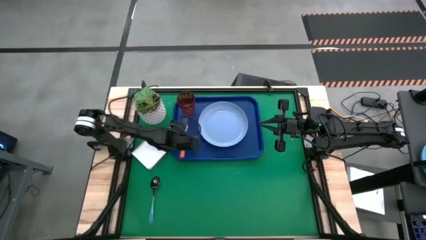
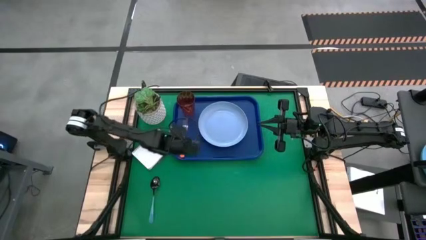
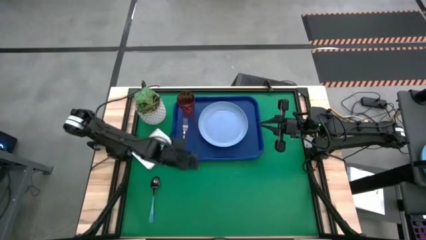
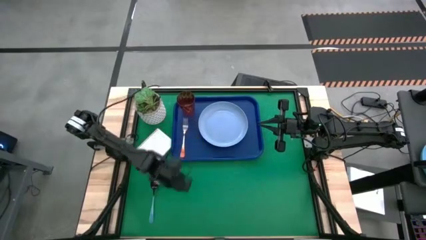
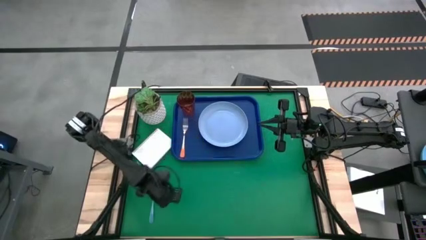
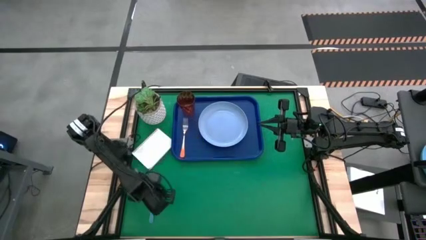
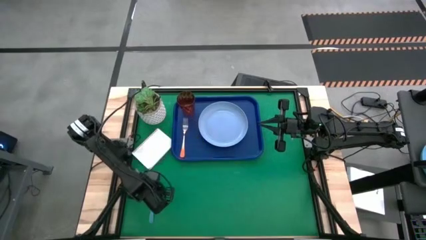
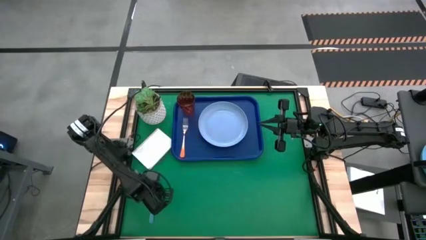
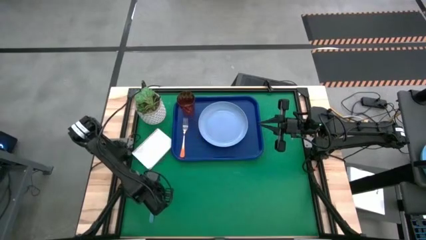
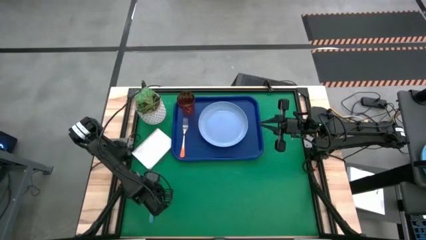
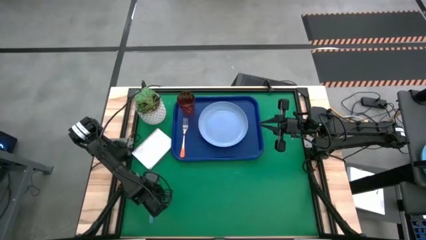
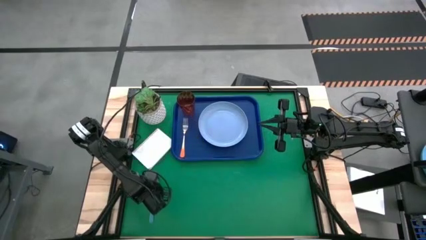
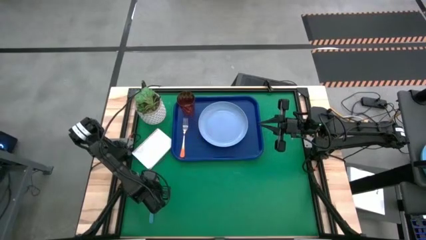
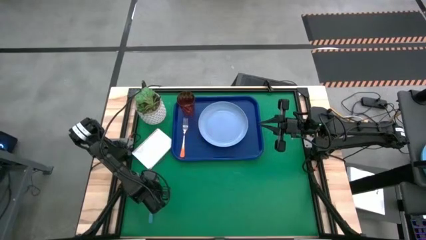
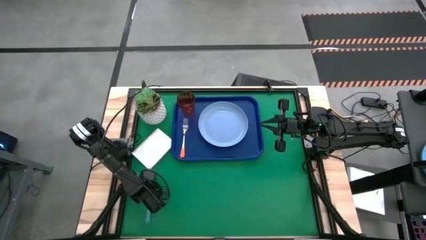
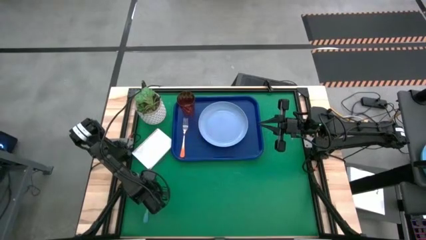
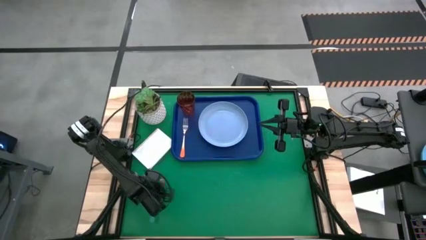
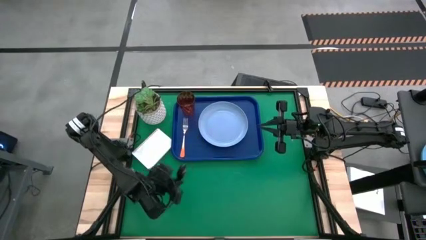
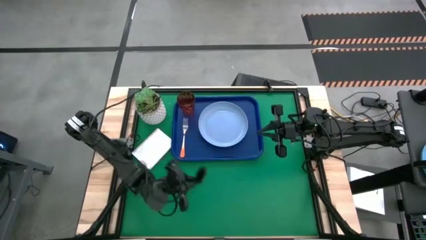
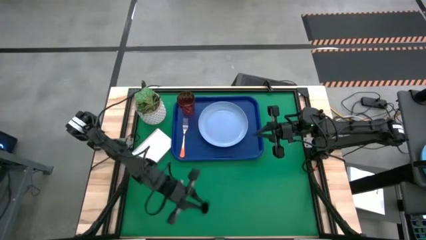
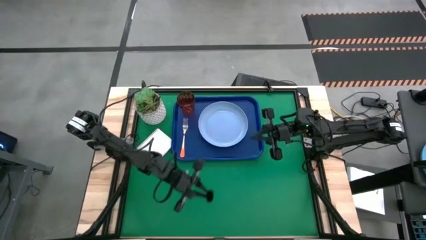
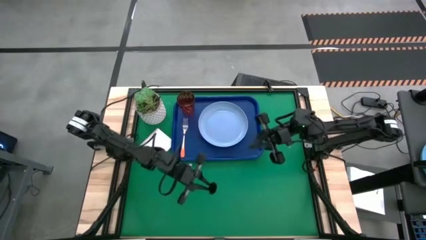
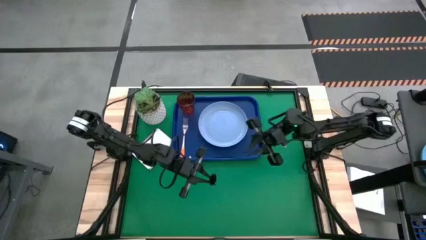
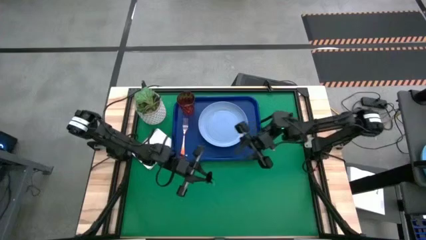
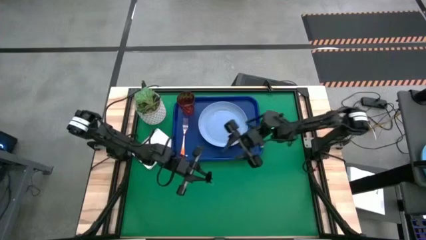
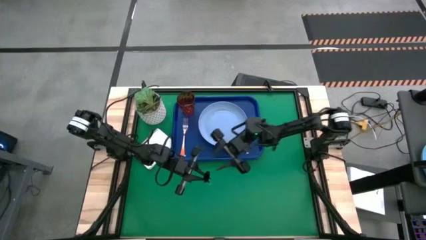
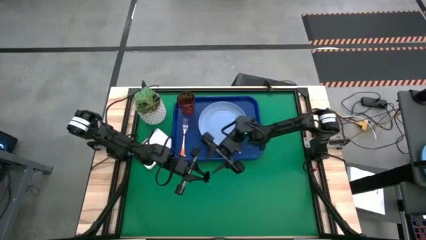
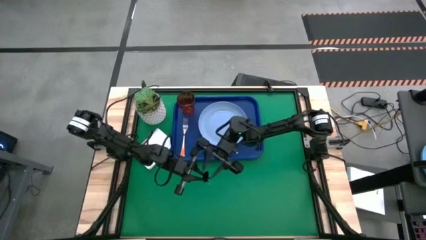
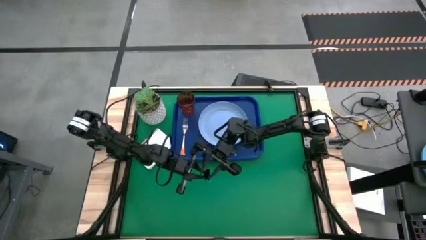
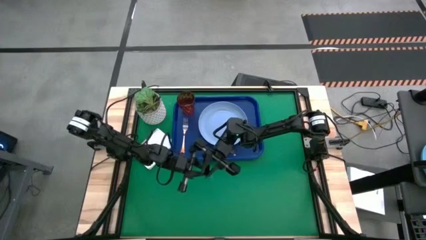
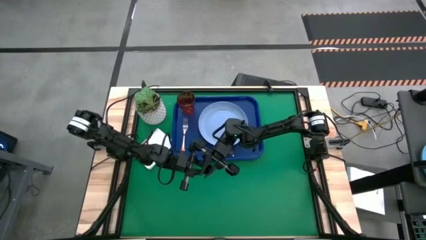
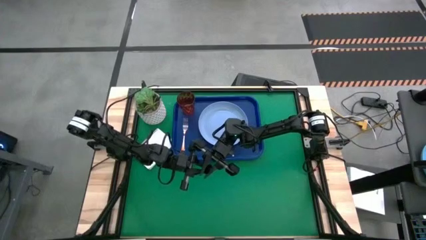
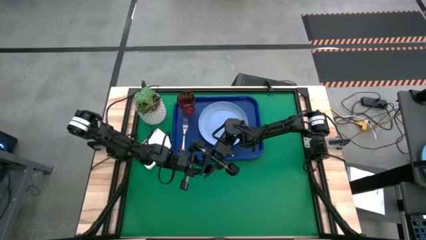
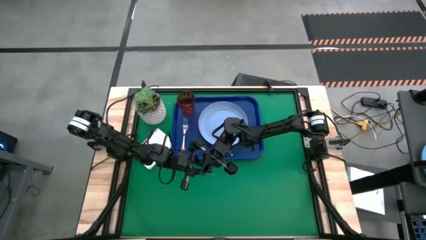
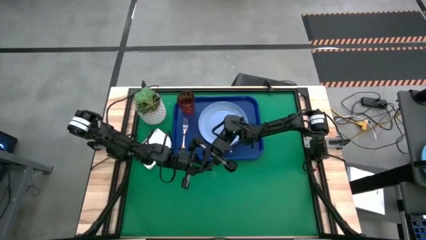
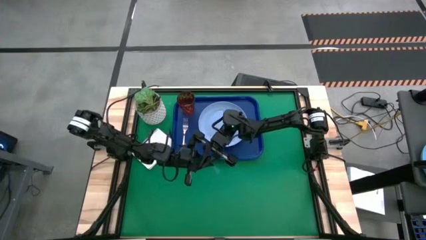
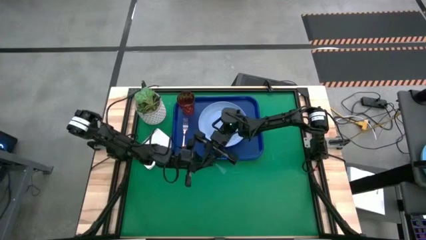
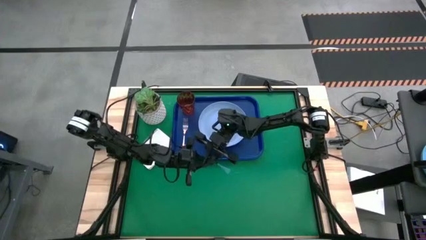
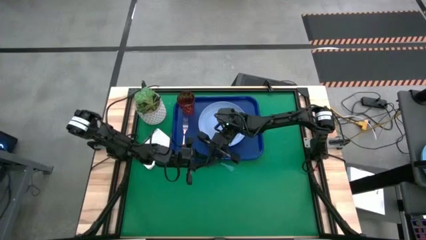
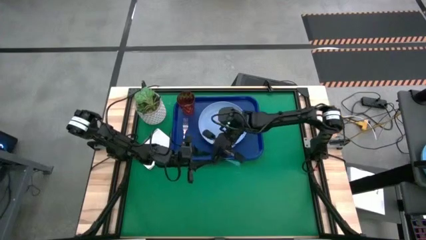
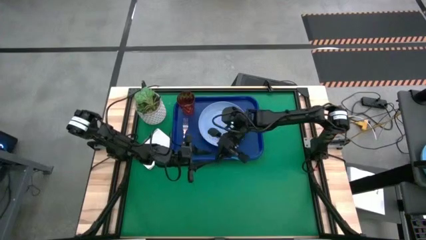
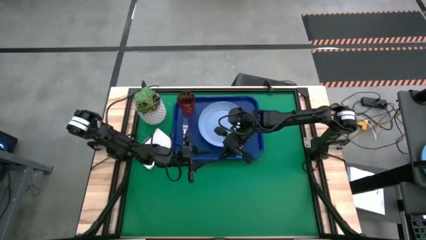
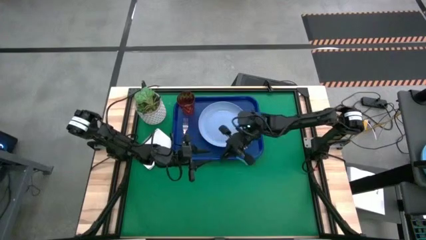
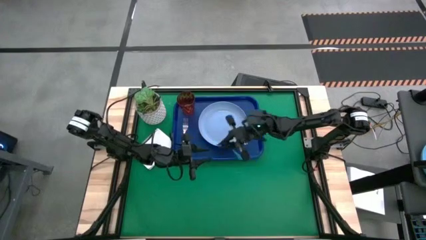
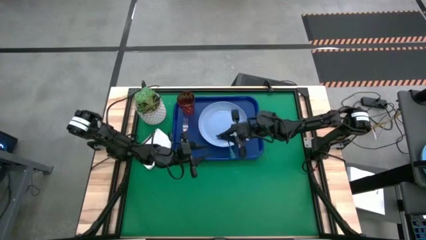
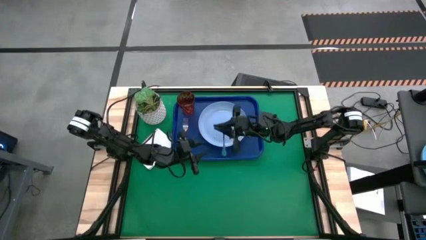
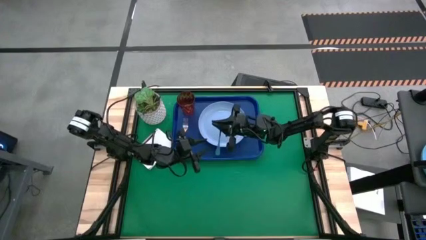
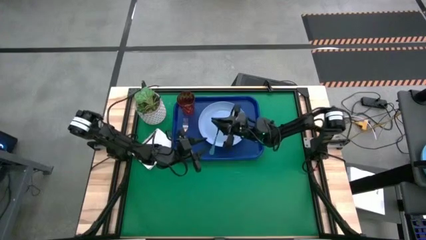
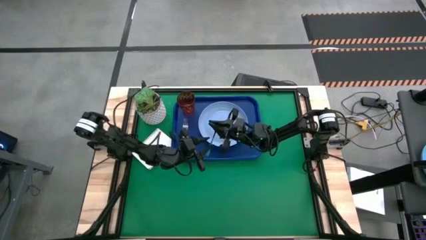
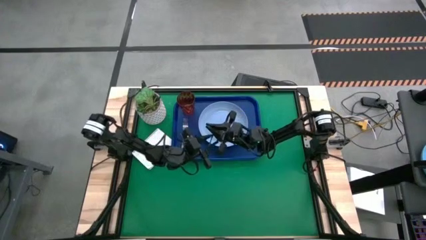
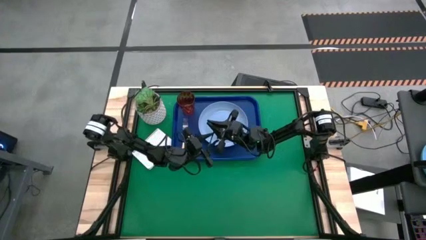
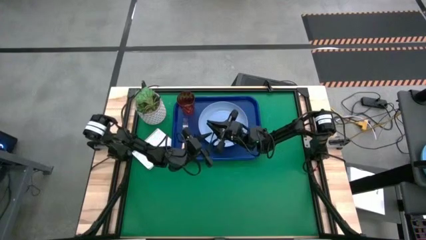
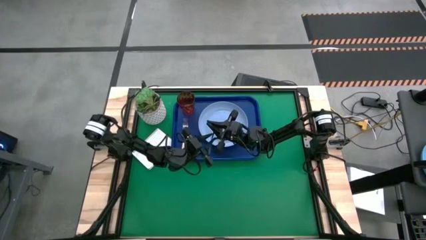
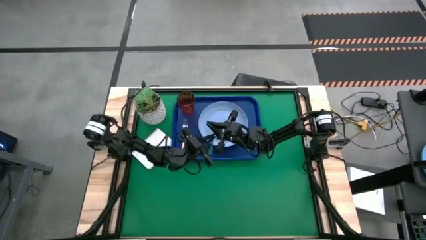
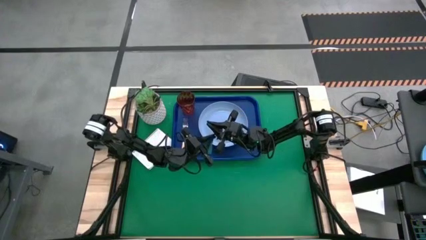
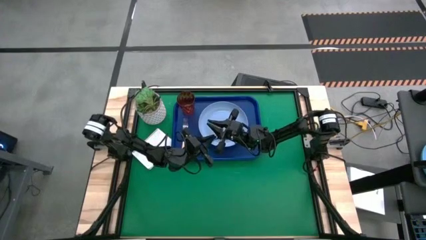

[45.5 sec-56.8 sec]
Task: Pick and place plate/cup/fork/spoon on tray
Put the blue spoon on the tray to the right of the orange fork
